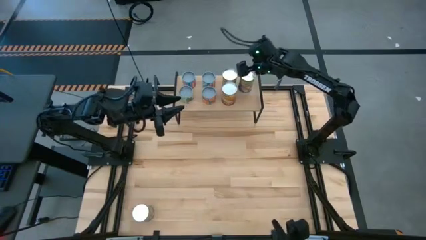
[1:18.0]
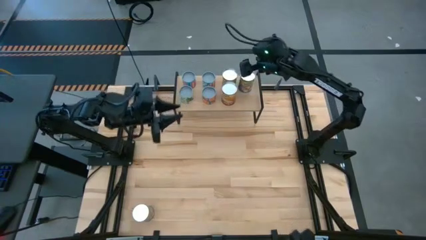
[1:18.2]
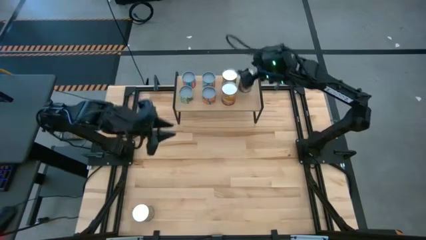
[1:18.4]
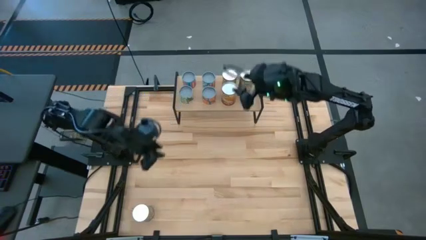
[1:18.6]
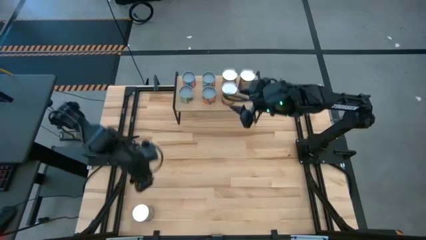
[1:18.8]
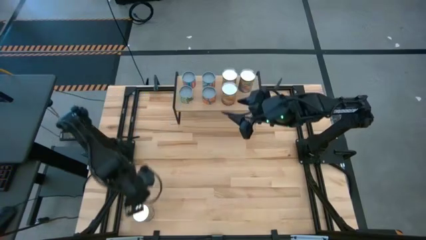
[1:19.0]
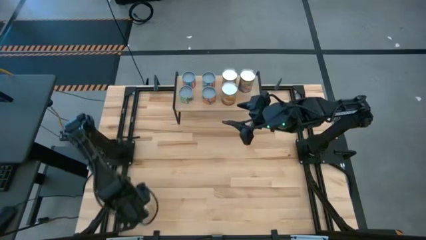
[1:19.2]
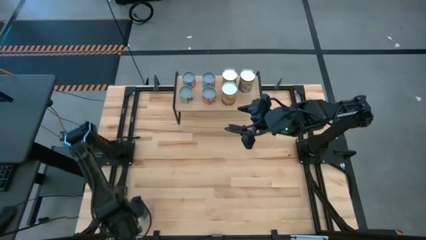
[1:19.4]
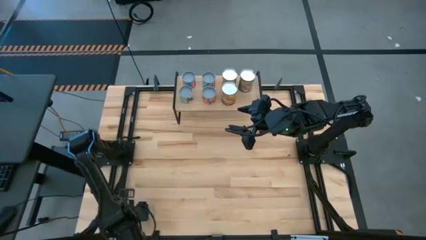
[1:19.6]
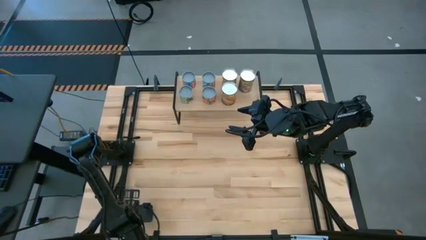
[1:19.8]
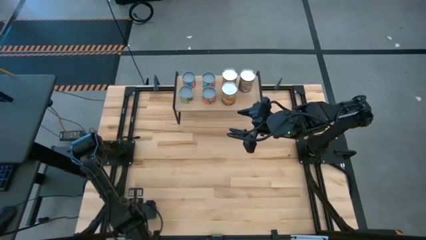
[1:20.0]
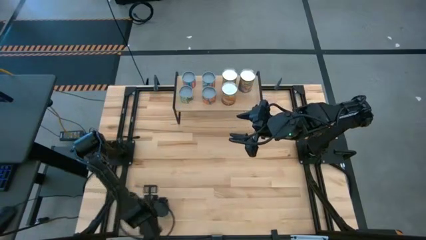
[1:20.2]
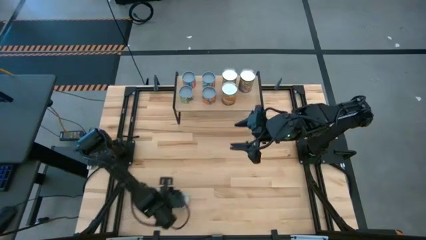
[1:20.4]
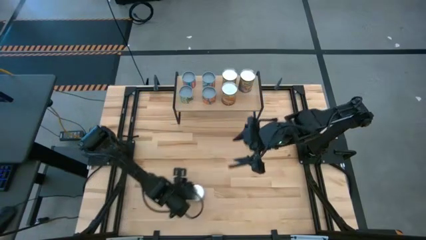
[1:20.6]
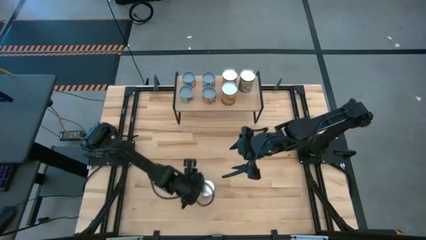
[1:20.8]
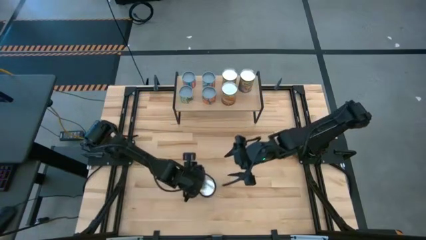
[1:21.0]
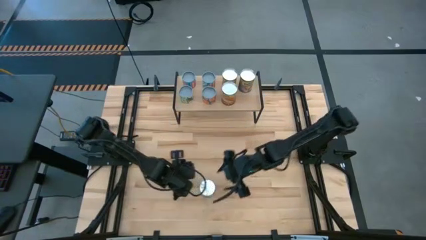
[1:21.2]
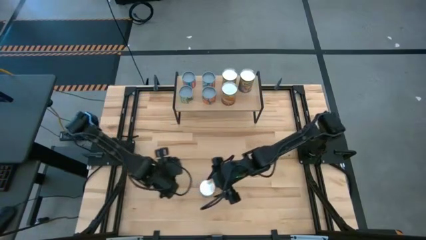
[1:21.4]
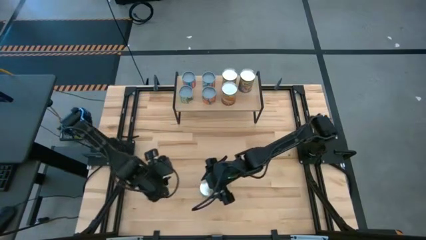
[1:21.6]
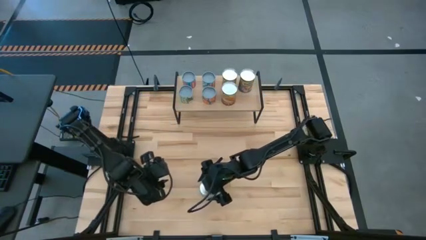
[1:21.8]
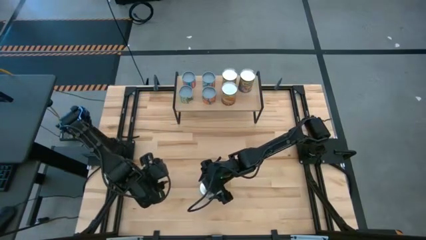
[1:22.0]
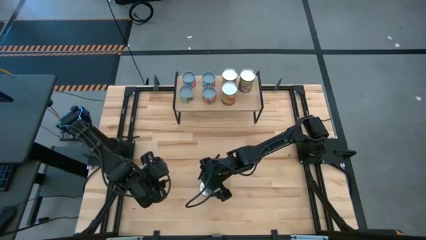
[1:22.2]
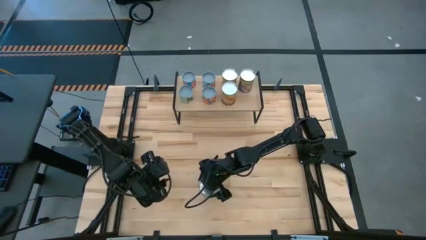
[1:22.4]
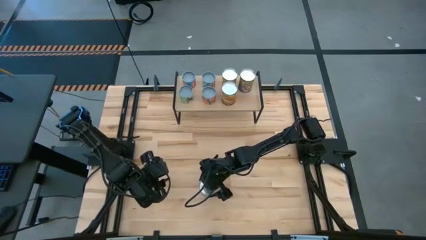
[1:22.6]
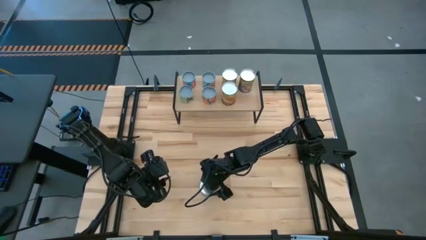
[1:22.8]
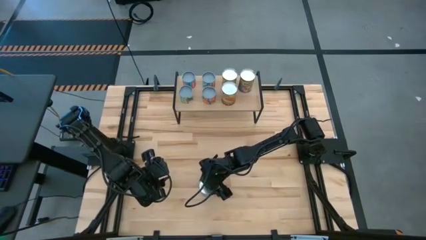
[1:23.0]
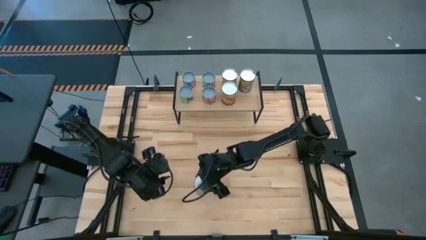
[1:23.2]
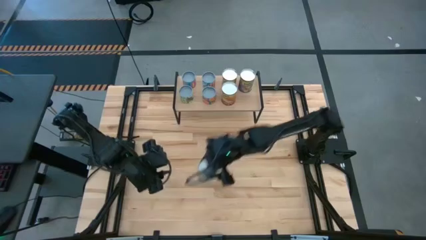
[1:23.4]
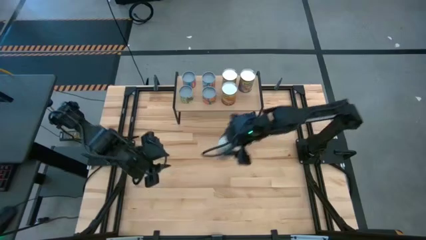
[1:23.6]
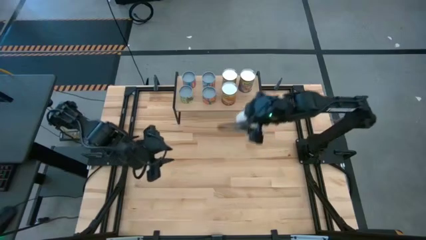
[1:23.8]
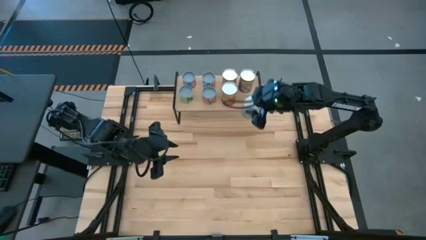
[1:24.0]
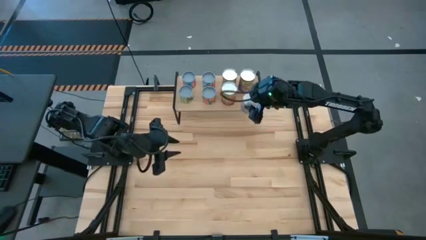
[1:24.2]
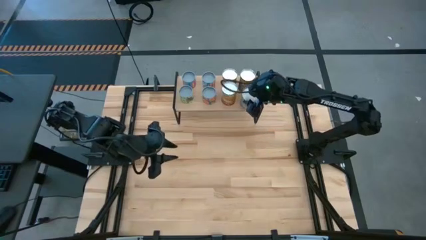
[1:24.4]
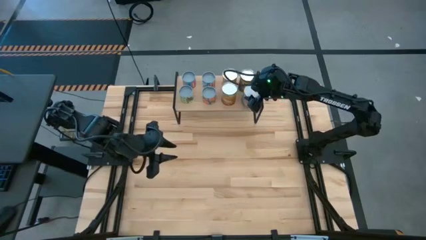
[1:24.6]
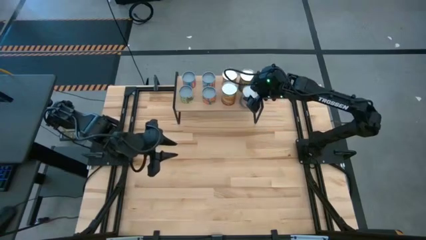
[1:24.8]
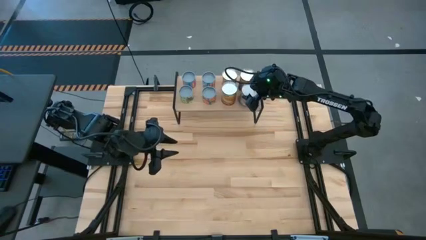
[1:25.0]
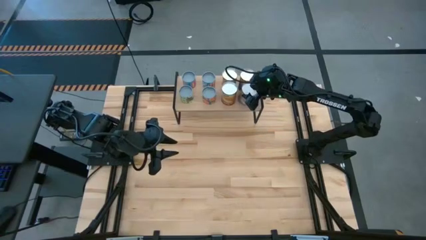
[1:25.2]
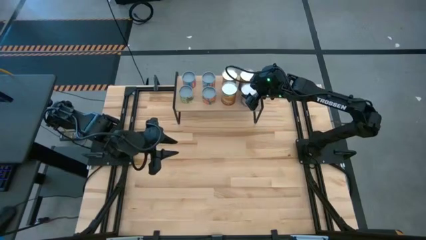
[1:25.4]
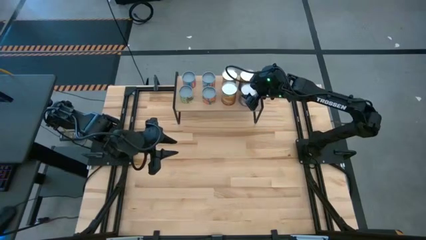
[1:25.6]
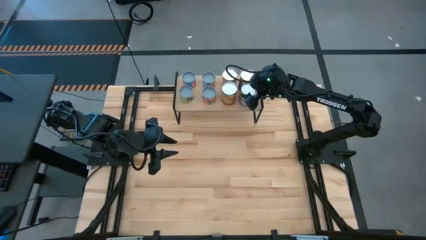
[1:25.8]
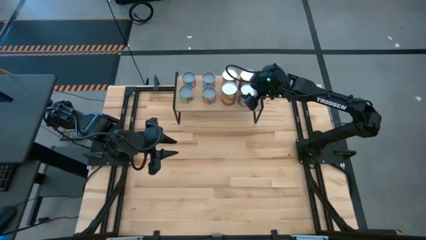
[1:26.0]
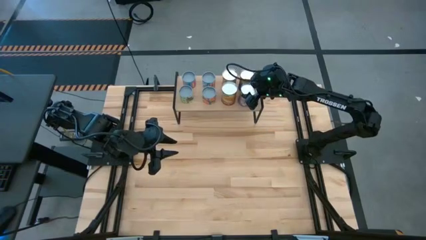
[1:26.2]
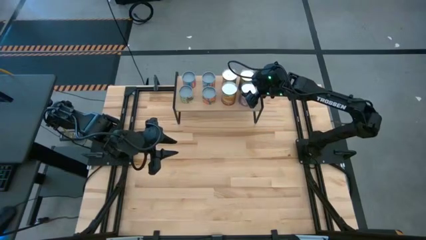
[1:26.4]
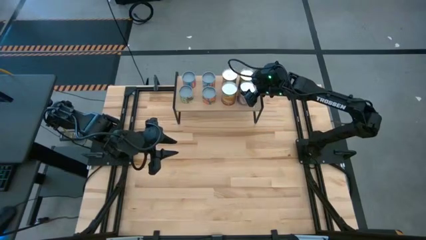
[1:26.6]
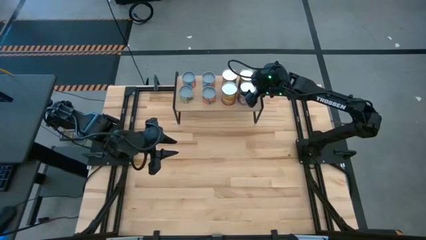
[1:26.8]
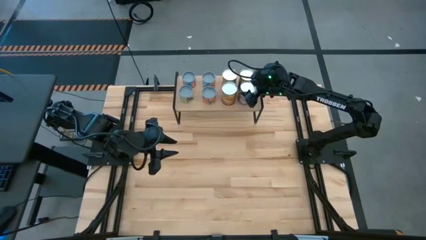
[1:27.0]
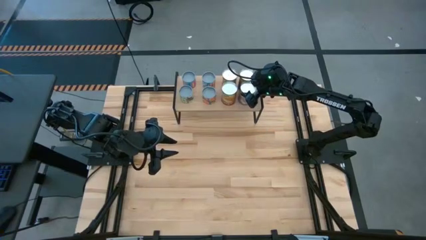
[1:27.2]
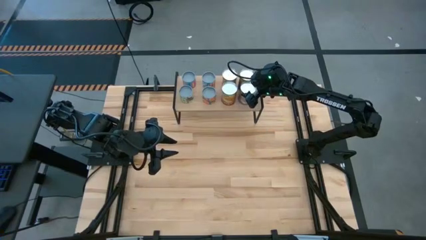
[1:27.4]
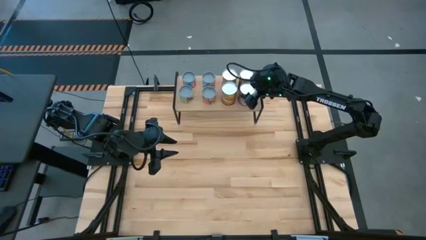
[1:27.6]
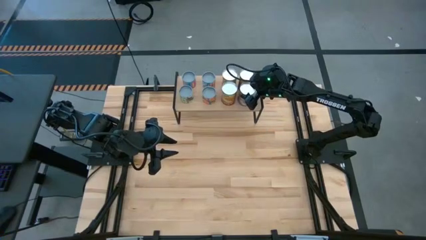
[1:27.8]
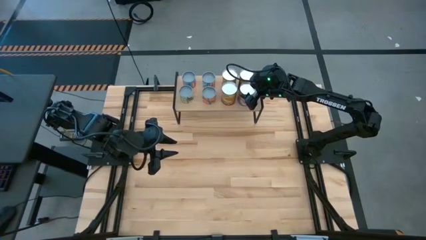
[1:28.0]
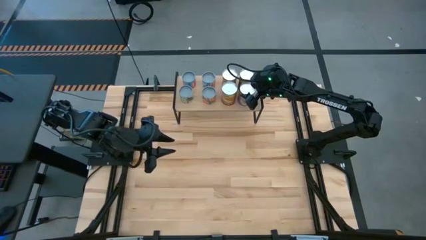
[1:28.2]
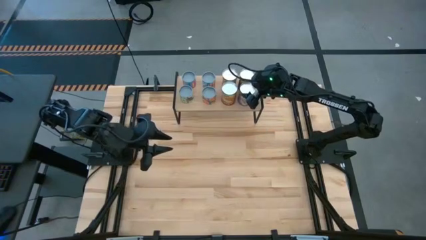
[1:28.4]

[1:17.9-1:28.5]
Task: Pick and place cans onto a shelf
Put the can of peaches on the shelf aligned with the other can of peaches

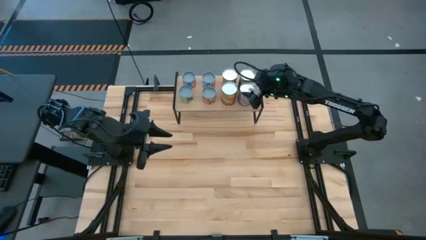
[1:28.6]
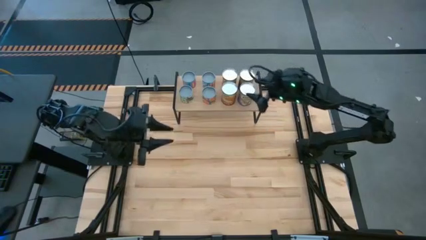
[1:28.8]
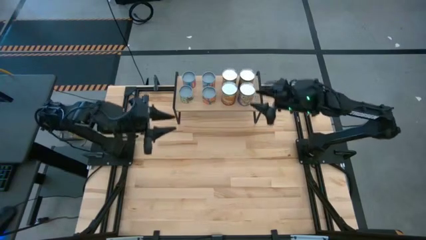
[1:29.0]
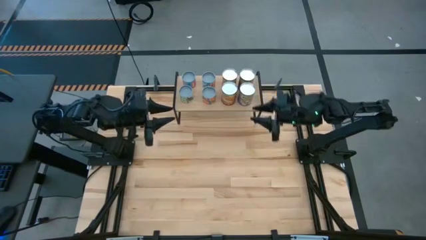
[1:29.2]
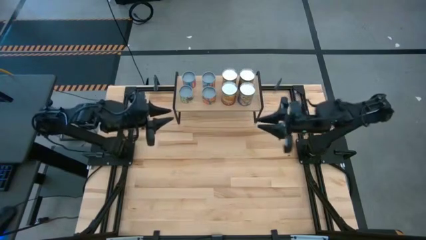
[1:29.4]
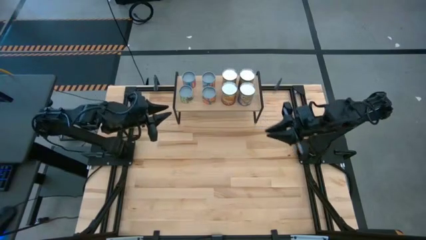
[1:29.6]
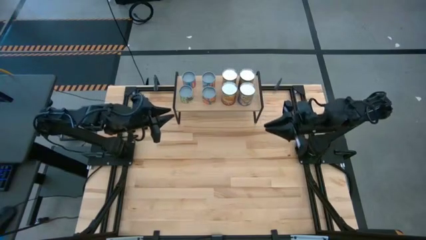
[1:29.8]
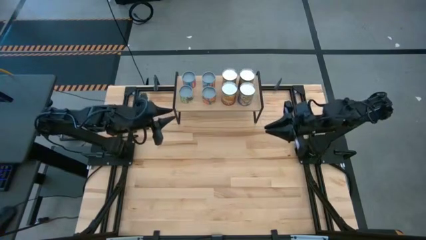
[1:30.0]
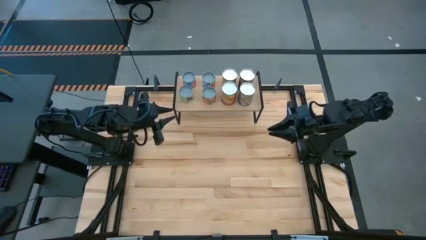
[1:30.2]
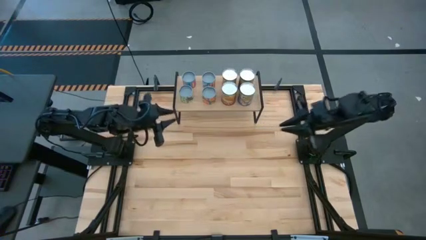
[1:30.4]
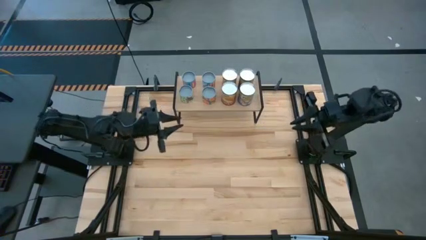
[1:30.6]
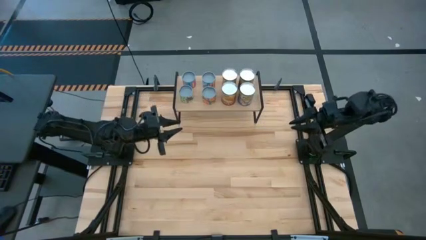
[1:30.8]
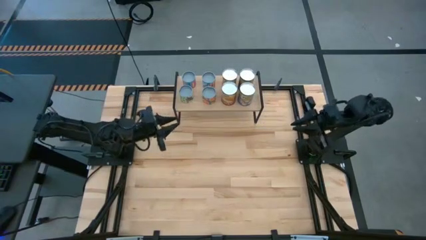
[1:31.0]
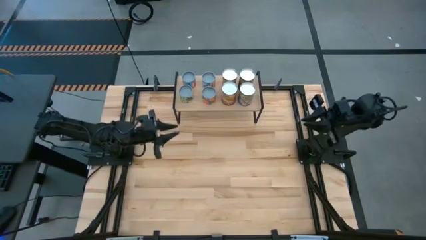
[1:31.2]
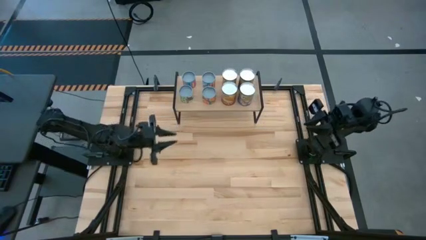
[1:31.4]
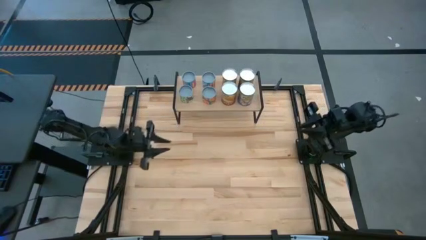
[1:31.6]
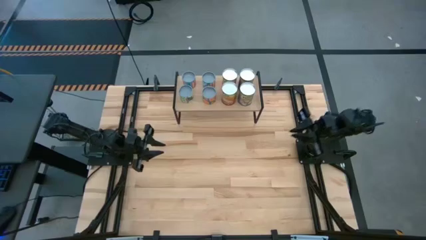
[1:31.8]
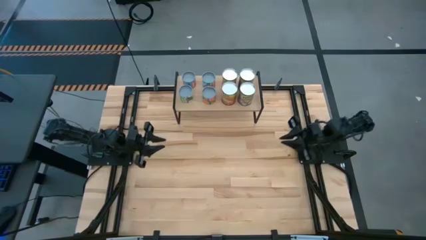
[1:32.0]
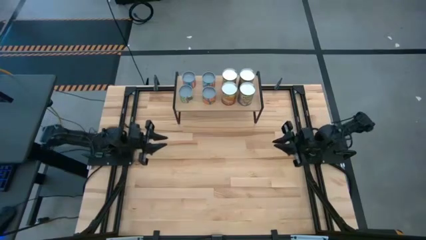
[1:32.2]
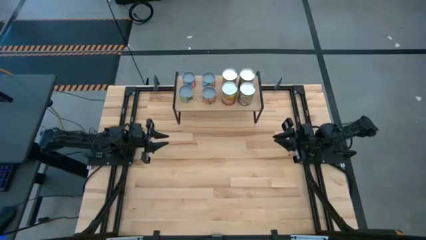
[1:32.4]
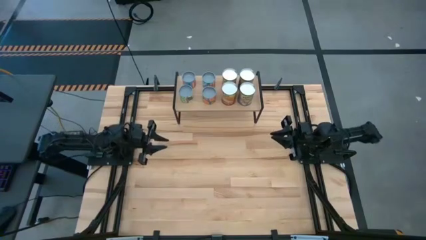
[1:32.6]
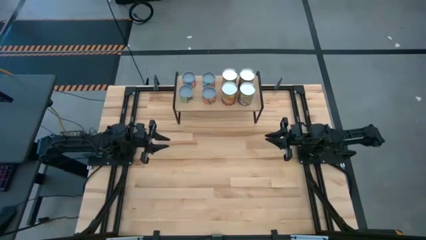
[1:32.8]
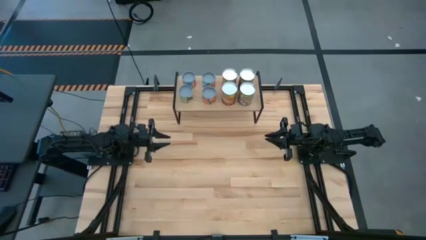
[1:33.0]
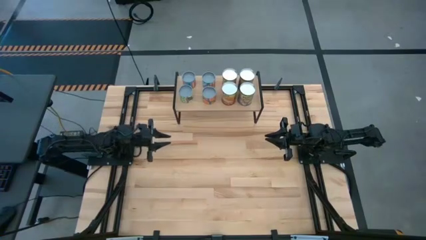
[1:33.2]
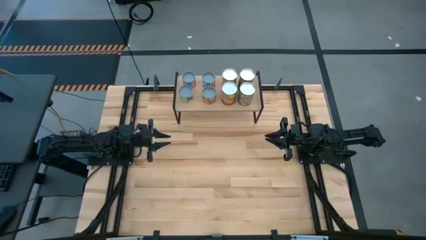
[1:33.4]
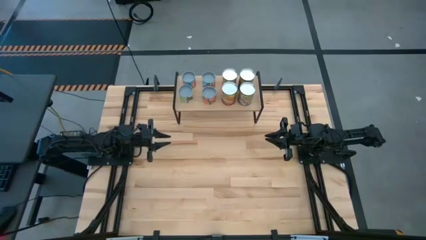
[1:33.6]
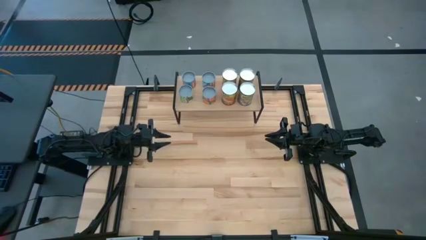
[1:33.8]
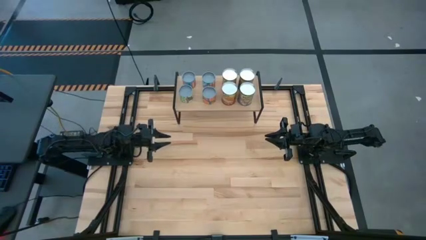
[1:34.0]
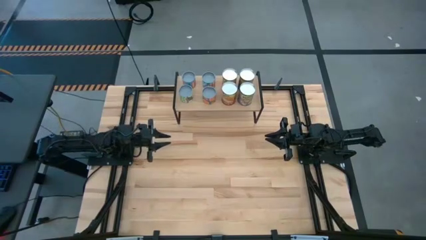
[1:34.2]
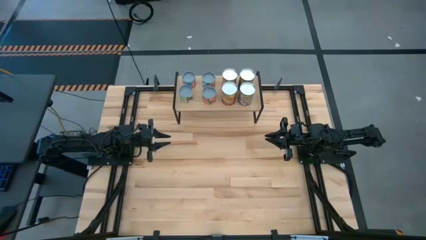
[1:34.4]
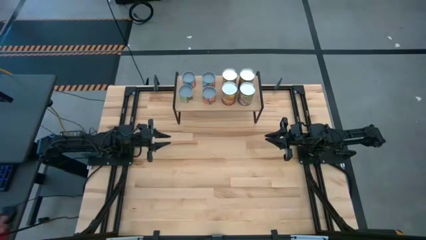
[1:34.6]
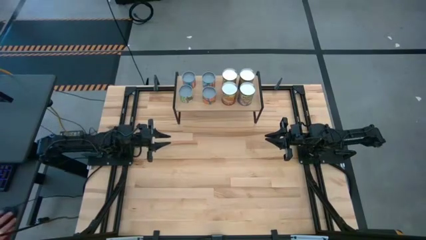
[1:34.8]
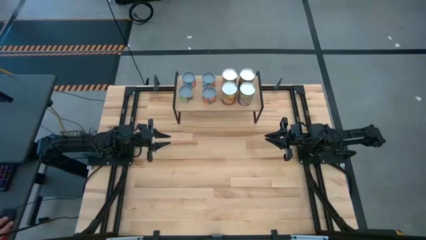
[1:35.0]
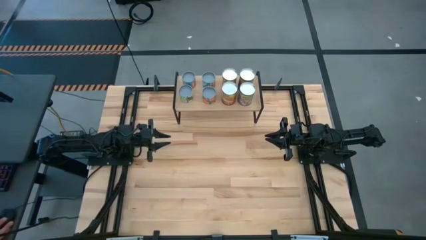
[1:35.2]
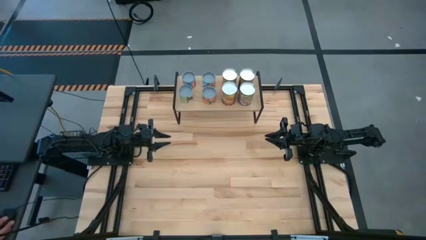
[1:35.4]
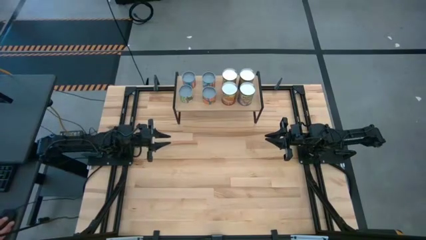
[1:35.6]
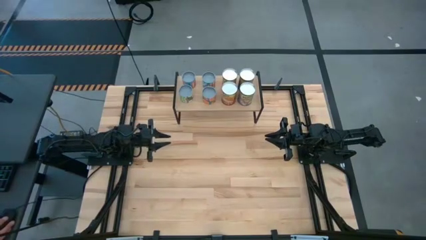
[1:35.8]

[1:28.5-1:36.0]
Return to Home Position
